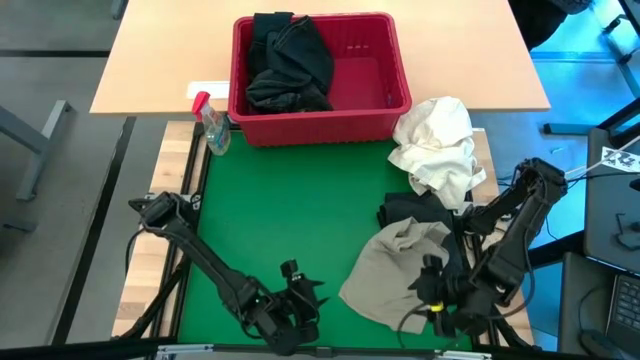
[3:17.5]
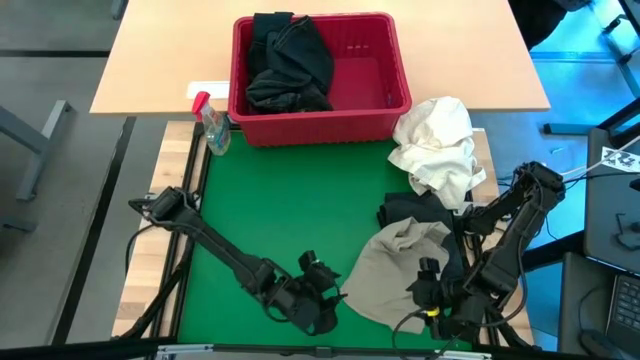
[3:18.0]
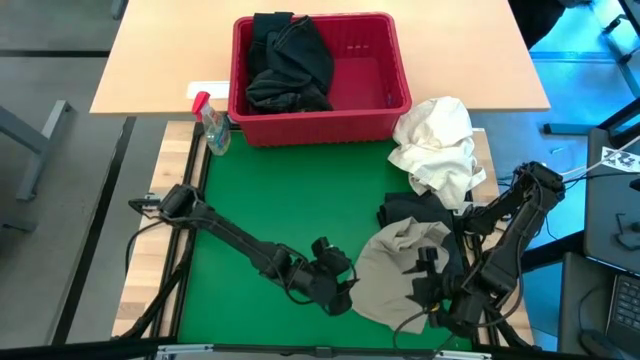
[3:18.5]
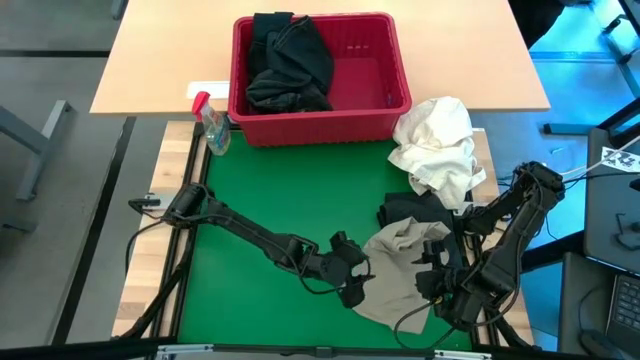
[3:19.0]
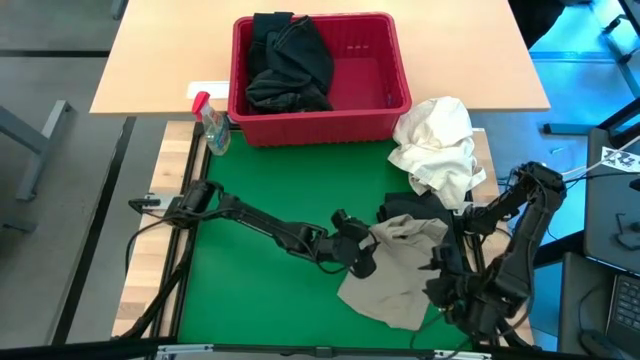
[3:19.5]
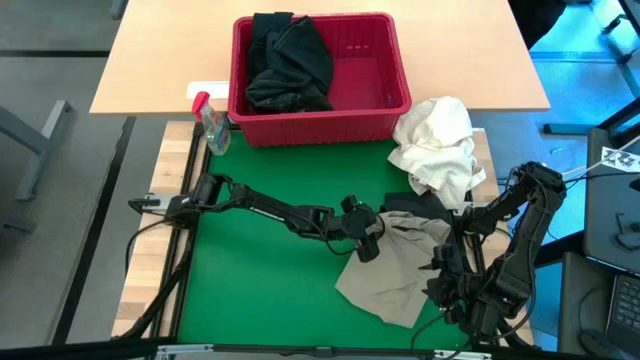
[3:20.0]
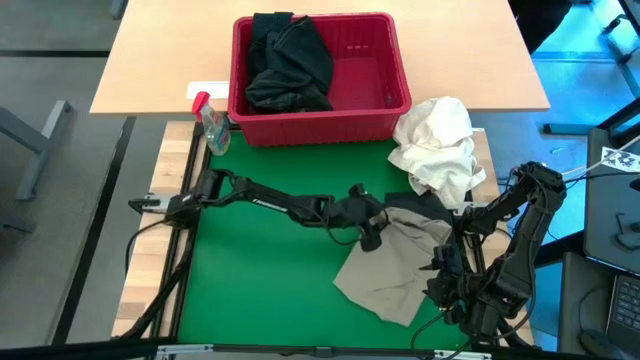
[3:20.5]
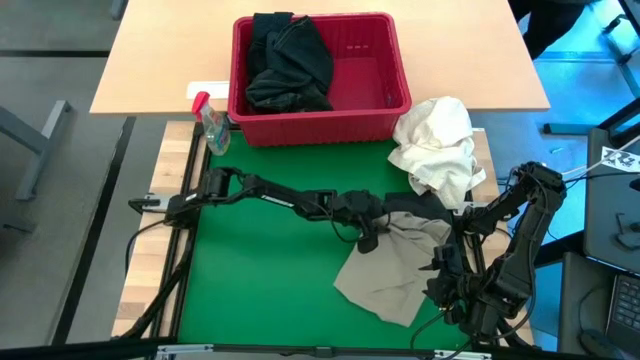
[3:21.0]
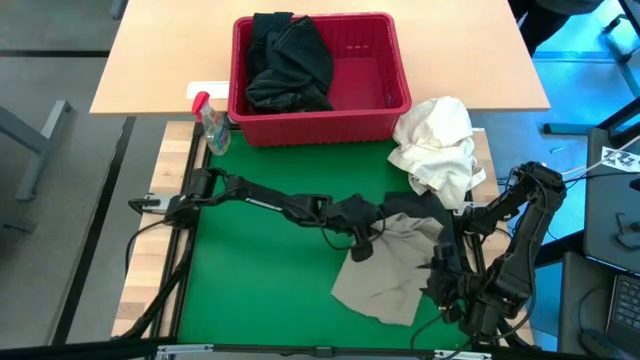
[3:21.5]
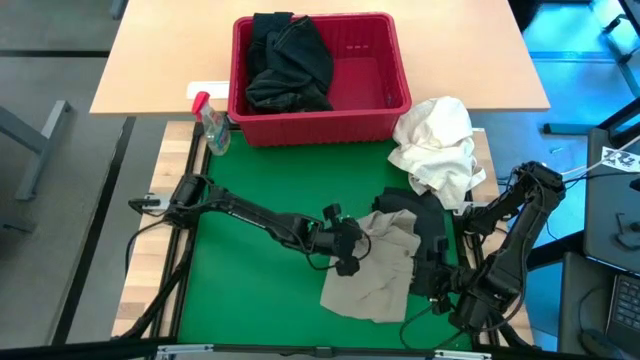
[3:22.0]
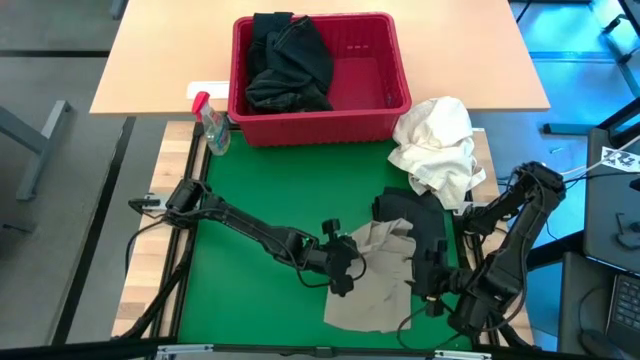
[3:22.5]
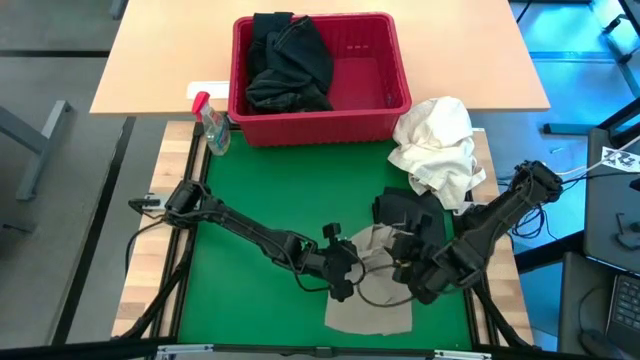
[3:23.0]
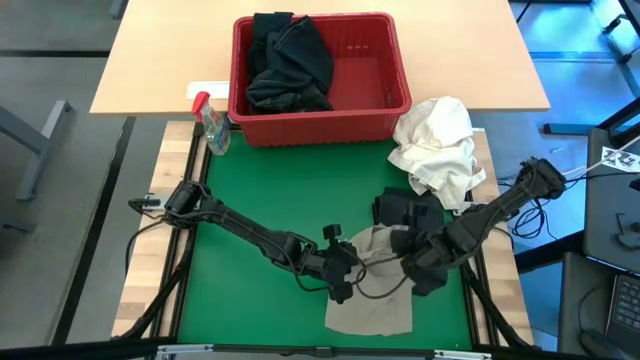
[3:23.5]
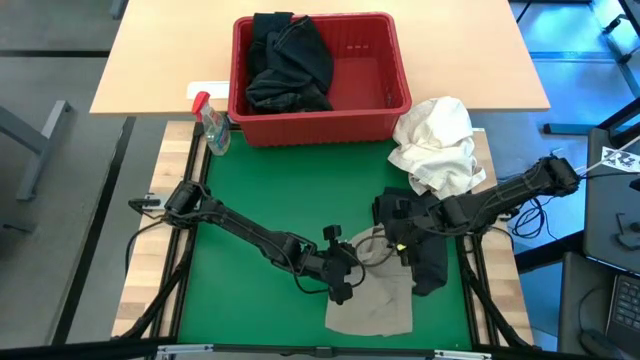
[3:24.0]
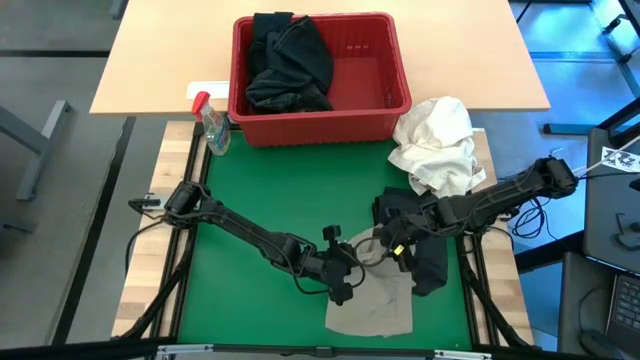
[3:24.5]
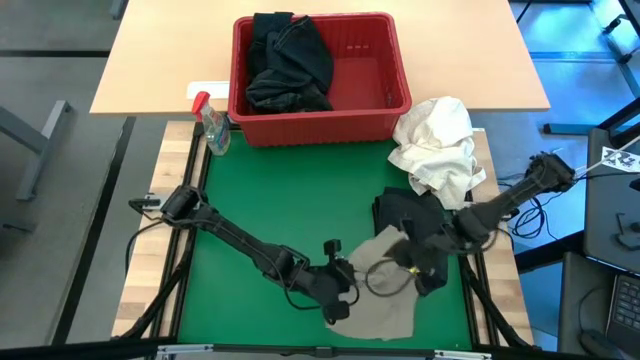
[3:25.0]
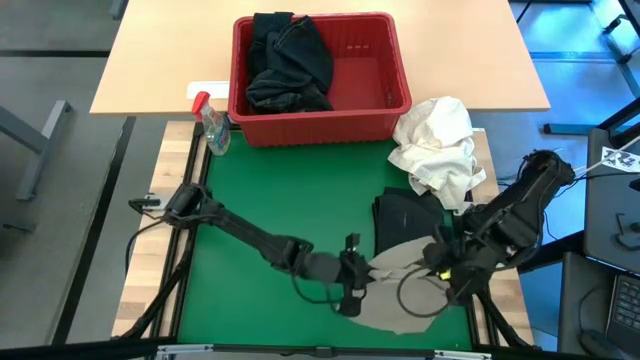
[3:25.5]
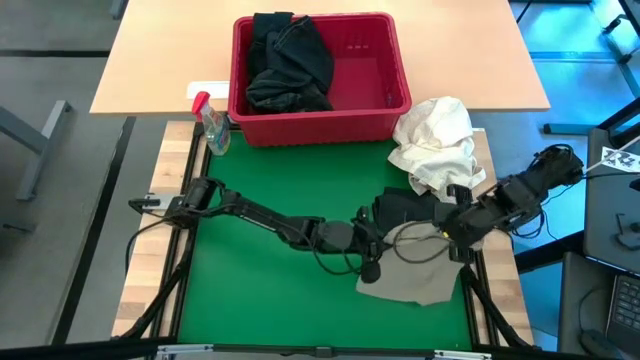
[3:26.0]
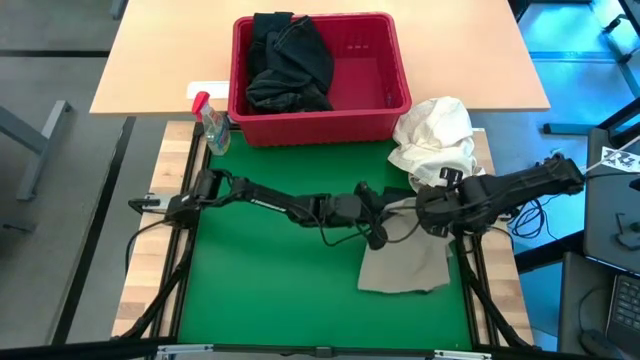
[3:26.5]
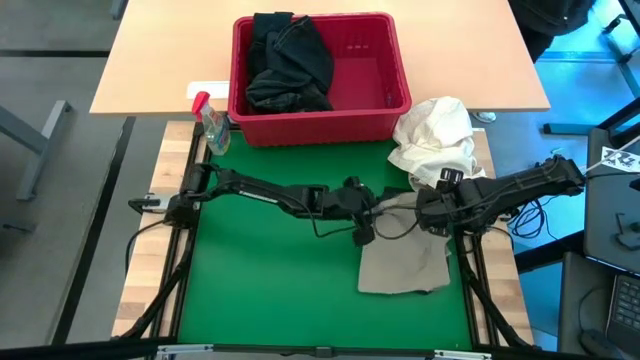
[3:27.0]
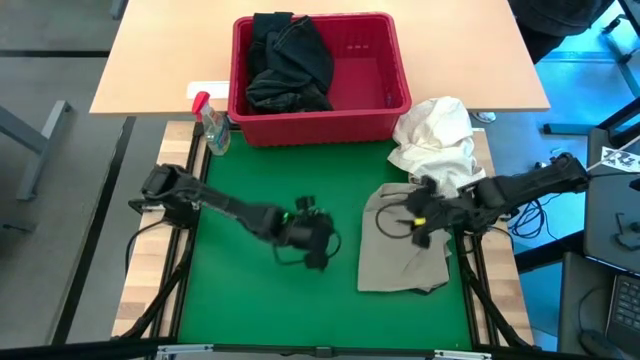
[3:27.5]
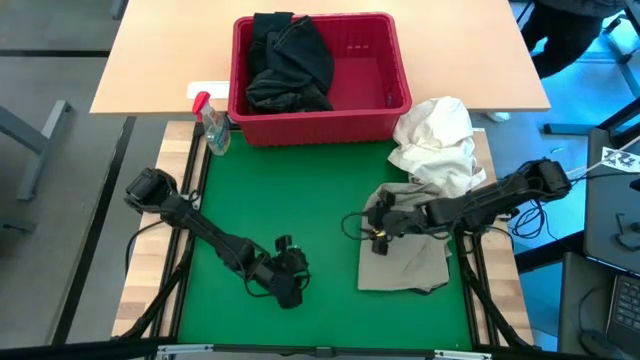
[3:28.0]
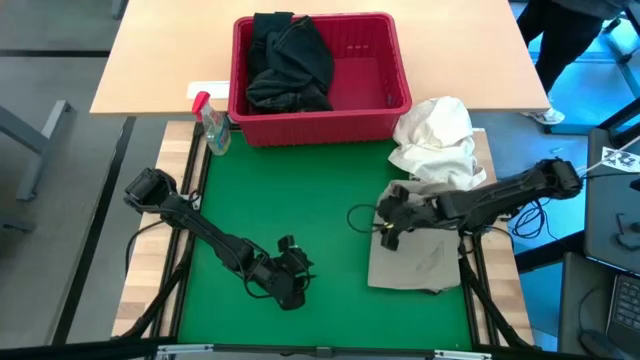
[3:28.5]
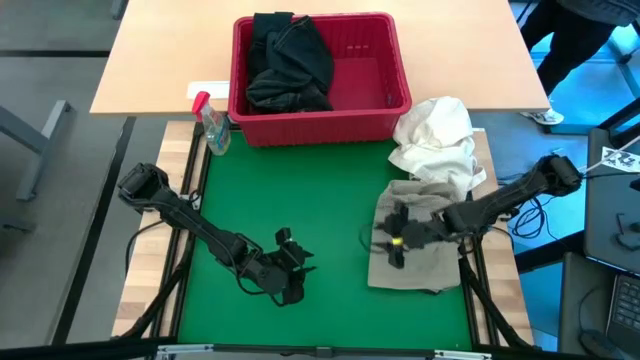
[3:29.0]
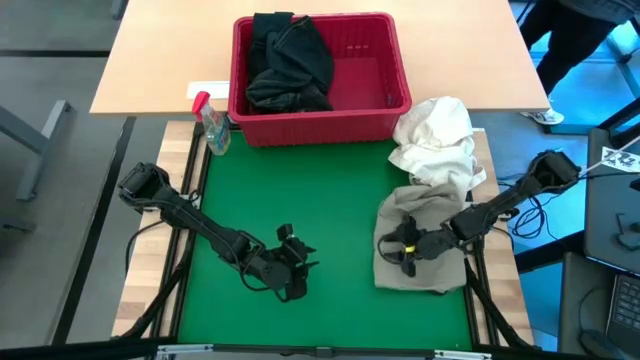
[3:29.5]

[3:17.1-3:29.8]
Task: Fold Laundry from Bin
Stack the brown shorts on top of the black shorts

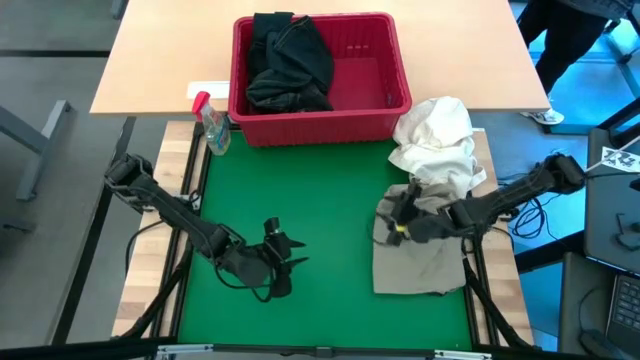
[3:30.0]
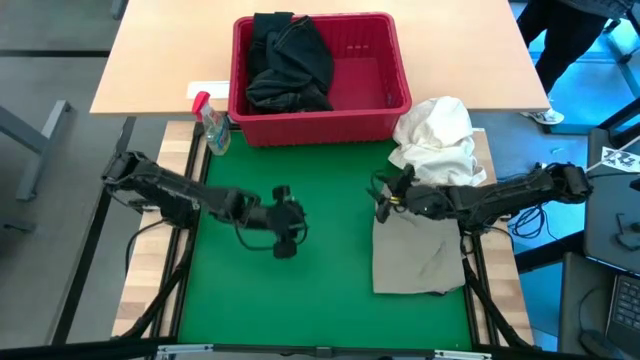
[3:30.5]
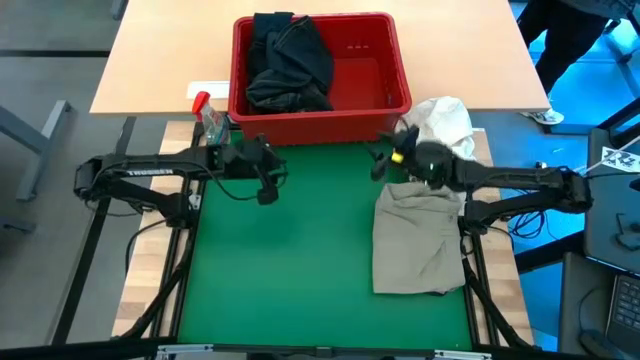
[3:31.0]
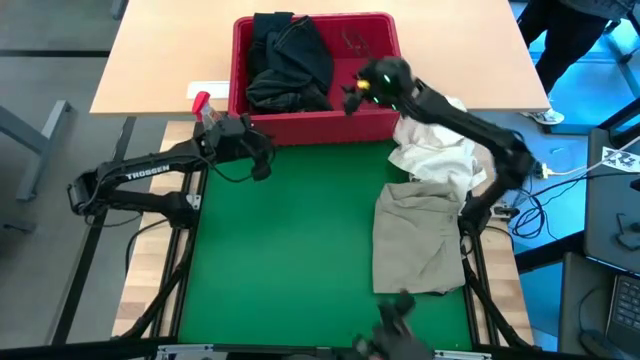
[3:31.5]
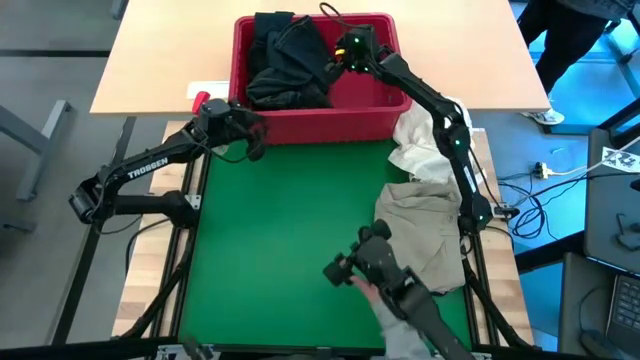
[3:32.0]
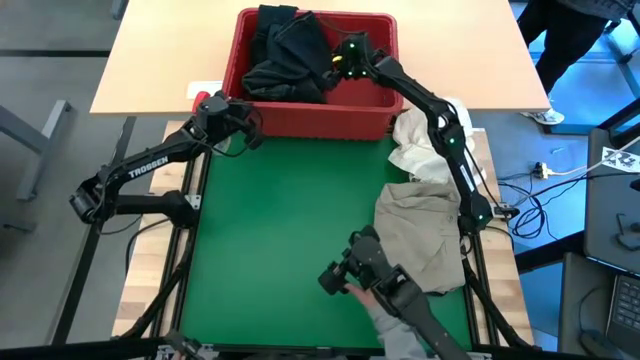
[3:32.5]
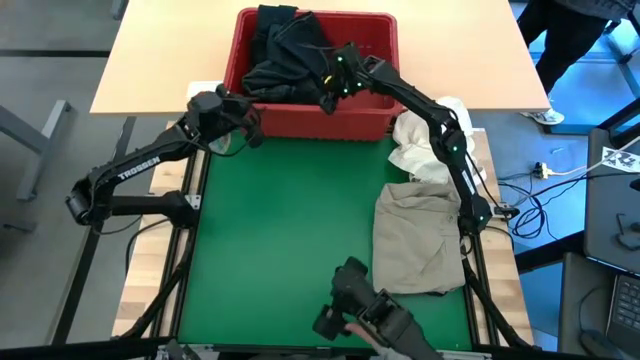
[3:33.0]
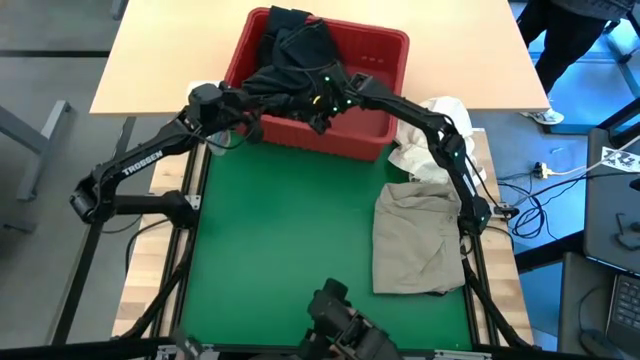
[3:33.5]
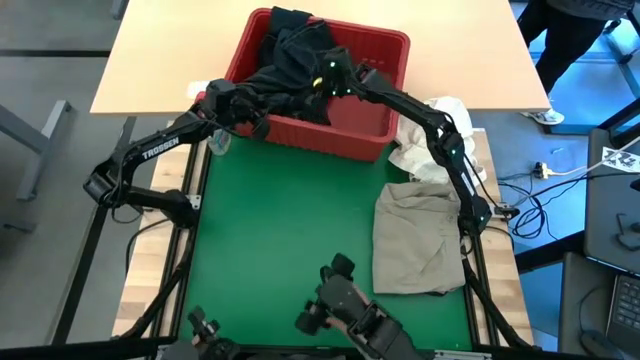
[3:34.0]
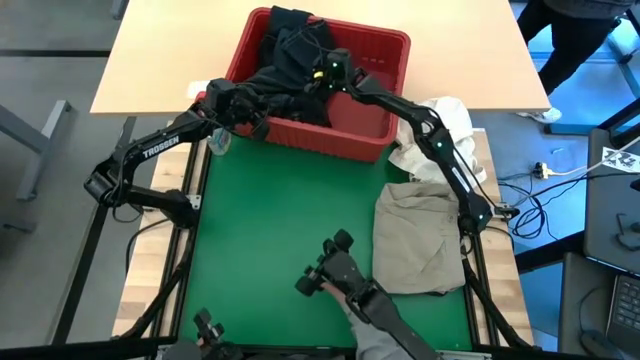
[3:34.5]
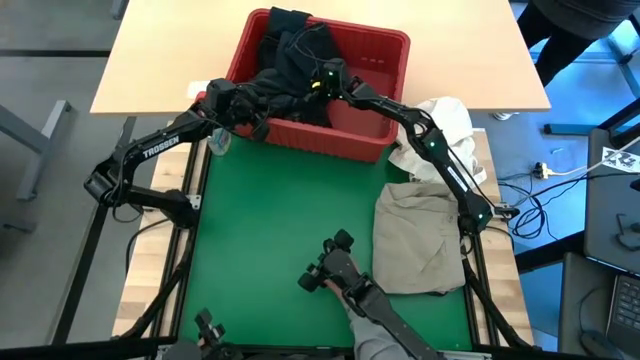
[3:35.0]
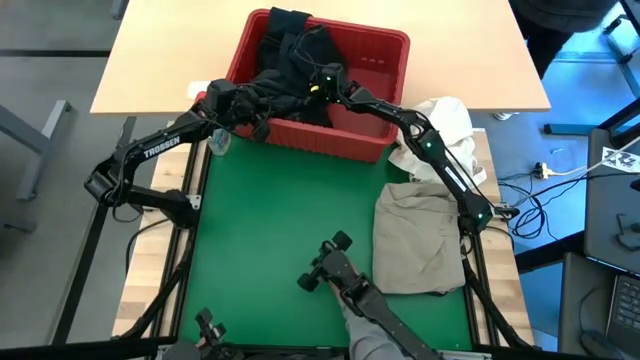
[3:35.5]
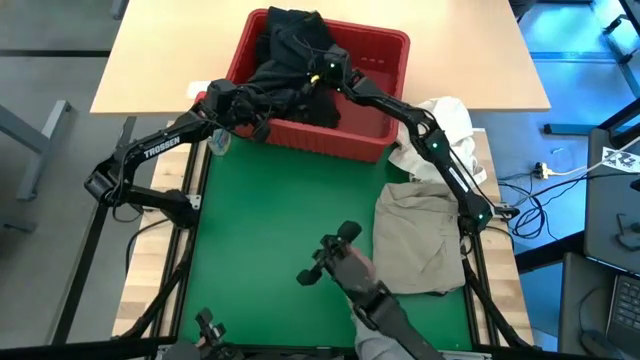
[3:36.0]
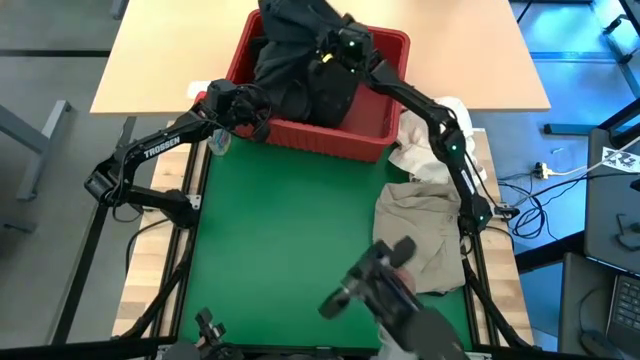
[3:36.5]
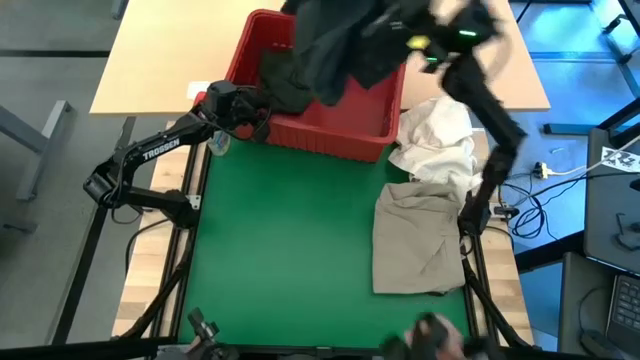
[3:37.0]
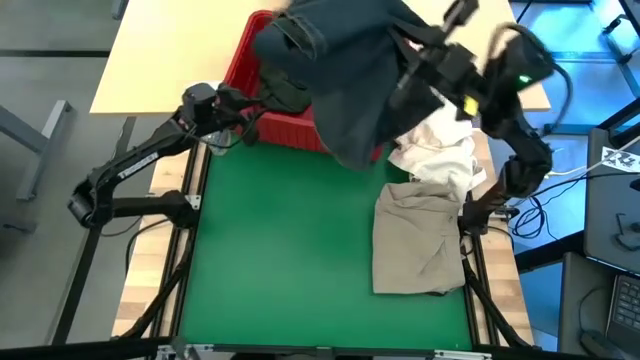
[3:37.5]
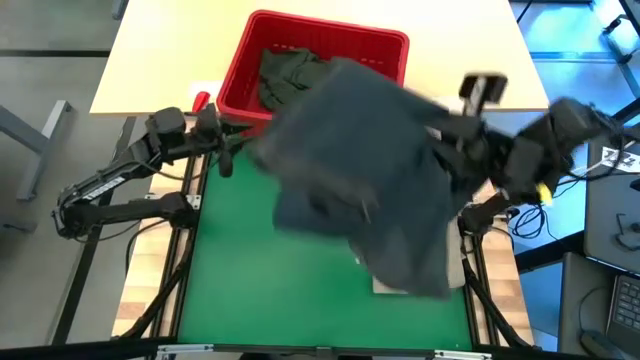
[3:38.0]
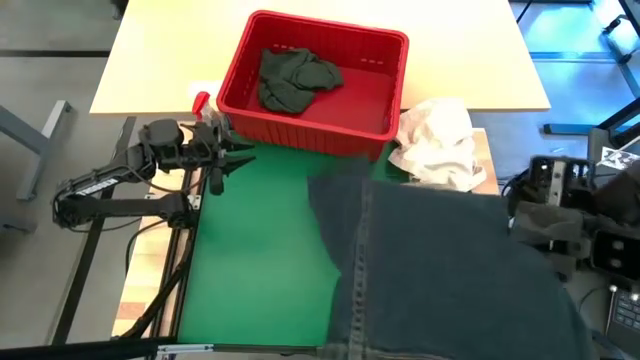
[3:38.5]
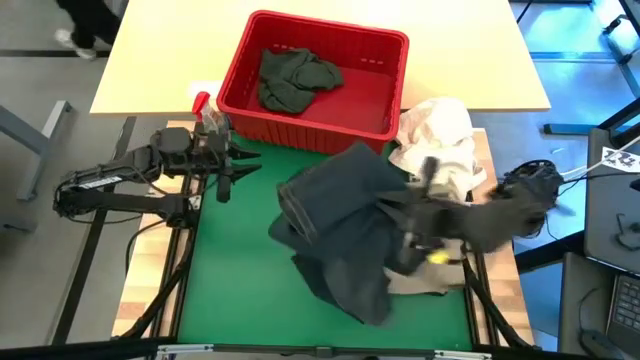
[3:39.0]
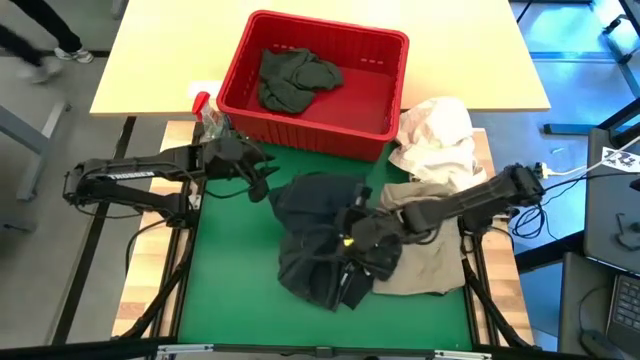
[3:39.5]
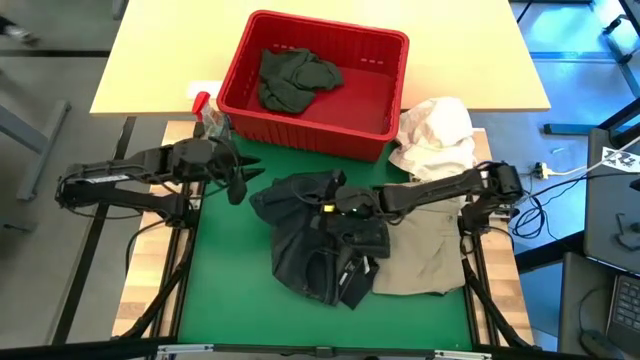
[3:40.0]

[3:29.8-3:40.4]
Remove the blue pants from the red laundry bin
